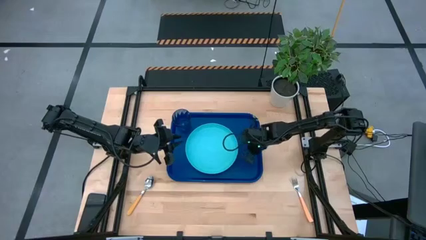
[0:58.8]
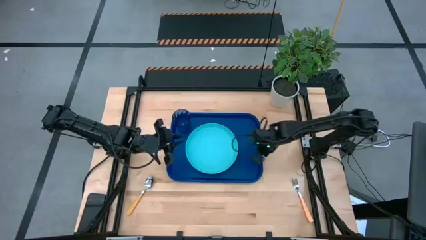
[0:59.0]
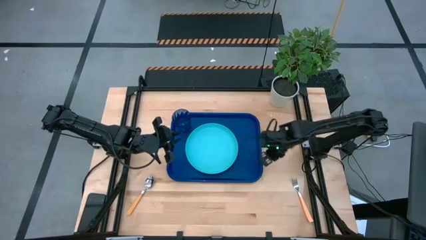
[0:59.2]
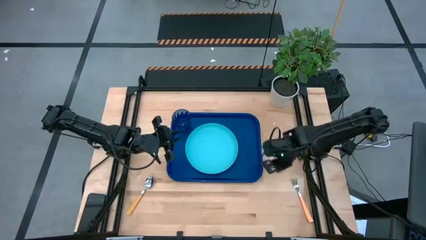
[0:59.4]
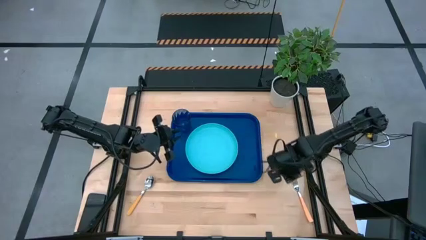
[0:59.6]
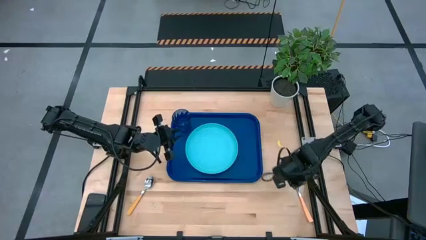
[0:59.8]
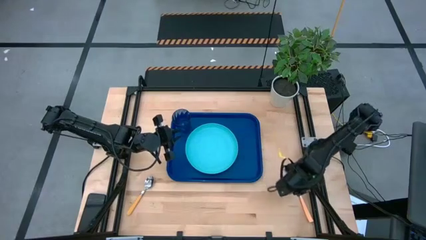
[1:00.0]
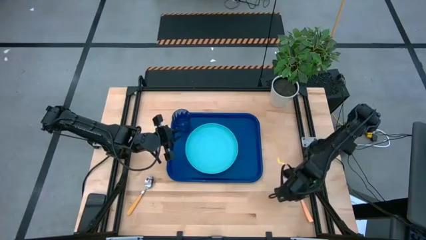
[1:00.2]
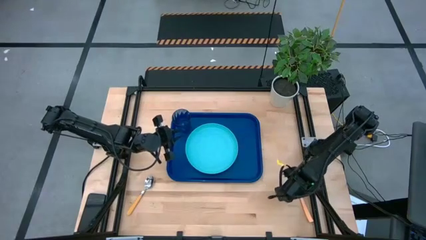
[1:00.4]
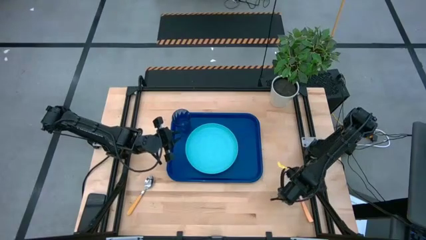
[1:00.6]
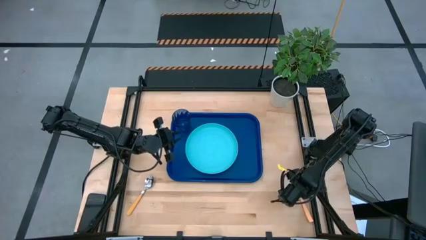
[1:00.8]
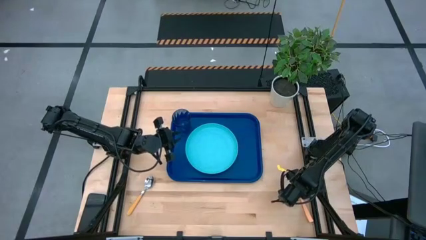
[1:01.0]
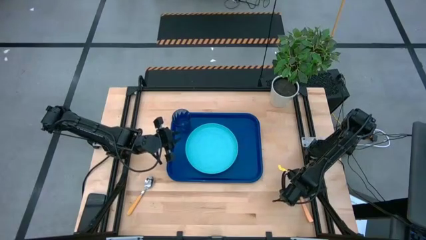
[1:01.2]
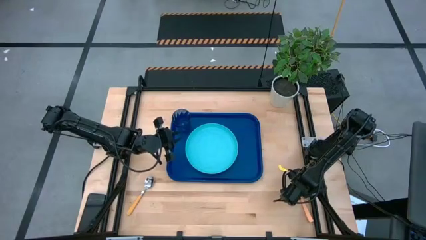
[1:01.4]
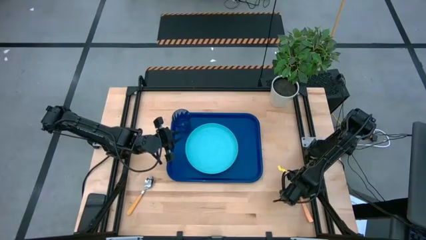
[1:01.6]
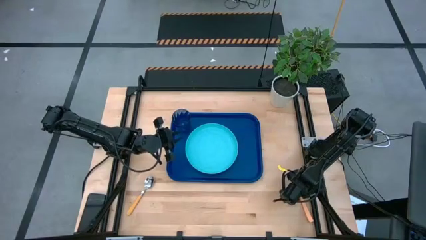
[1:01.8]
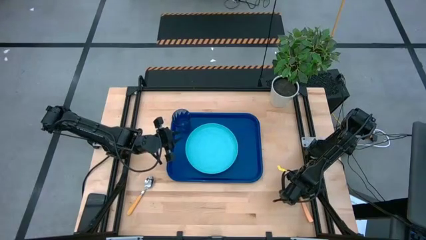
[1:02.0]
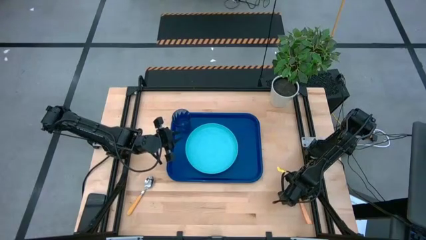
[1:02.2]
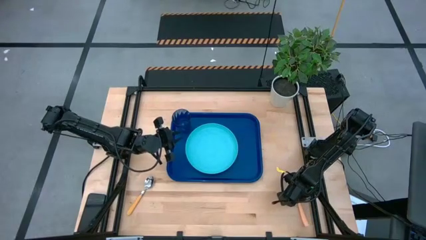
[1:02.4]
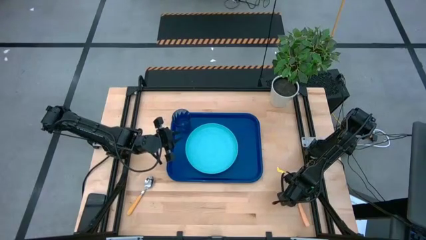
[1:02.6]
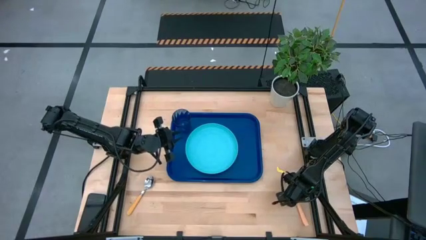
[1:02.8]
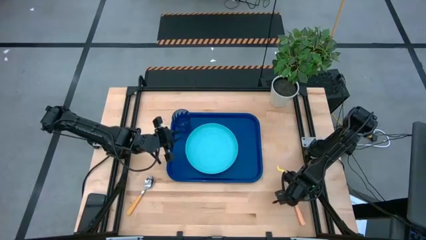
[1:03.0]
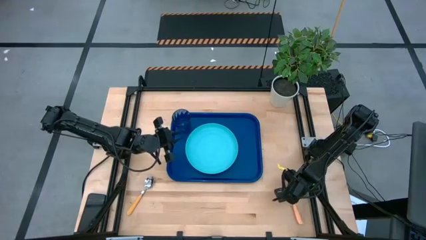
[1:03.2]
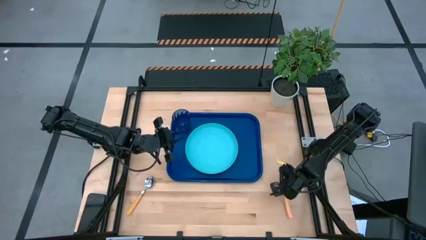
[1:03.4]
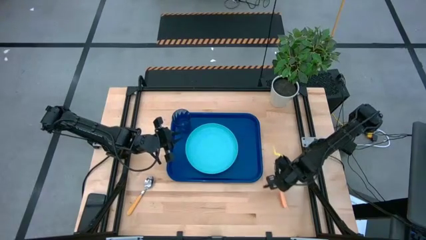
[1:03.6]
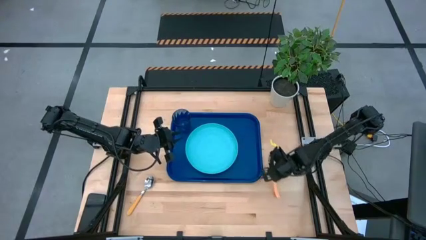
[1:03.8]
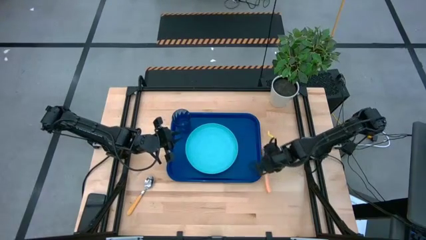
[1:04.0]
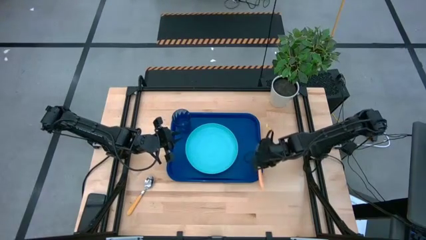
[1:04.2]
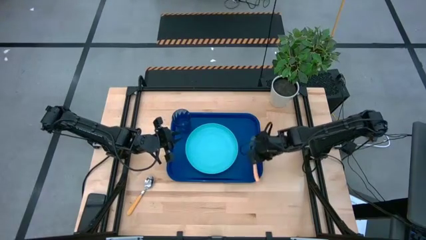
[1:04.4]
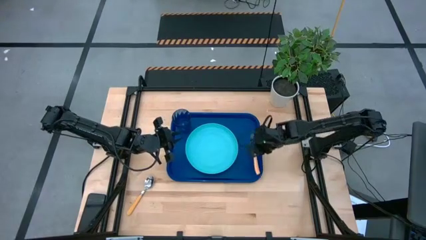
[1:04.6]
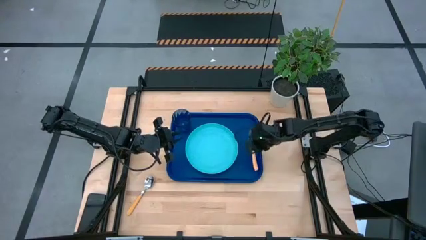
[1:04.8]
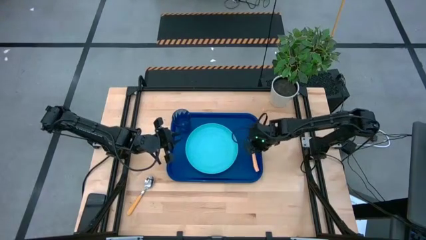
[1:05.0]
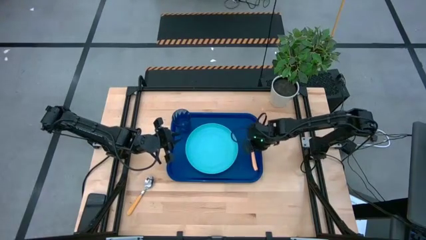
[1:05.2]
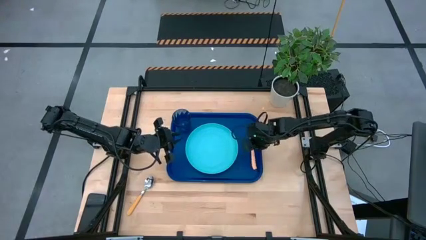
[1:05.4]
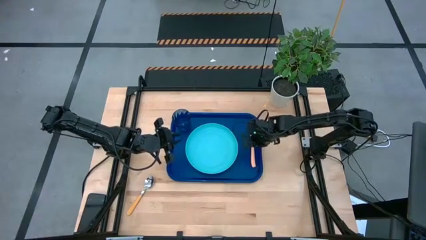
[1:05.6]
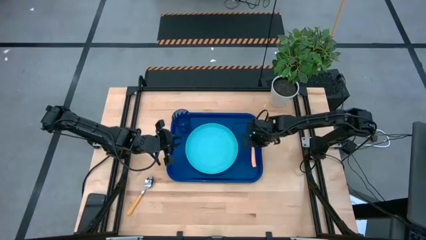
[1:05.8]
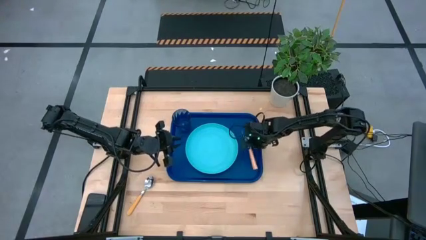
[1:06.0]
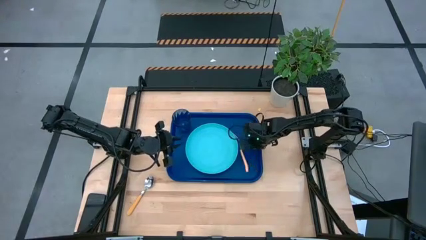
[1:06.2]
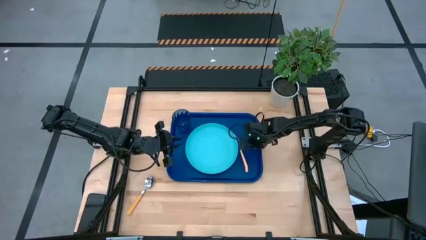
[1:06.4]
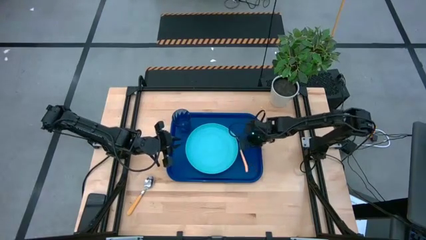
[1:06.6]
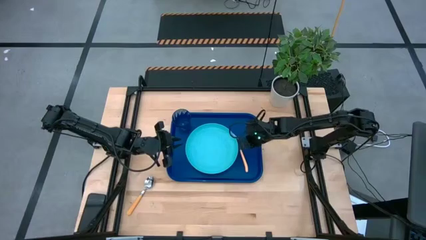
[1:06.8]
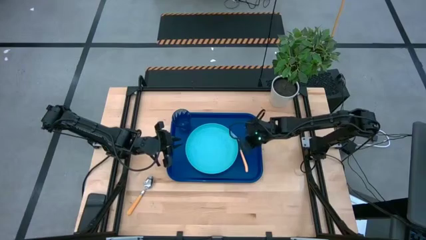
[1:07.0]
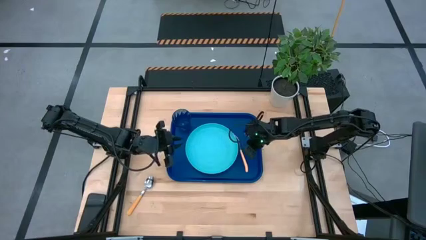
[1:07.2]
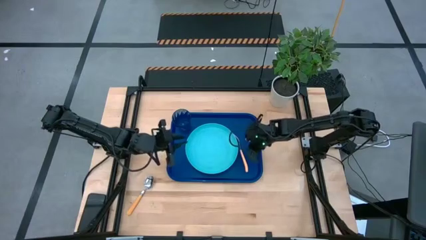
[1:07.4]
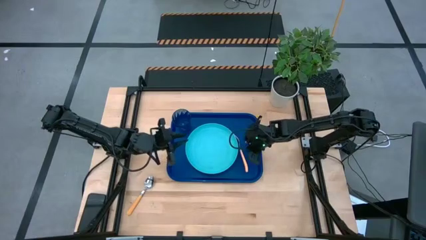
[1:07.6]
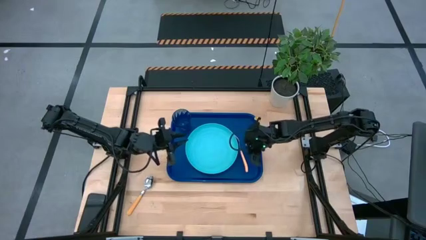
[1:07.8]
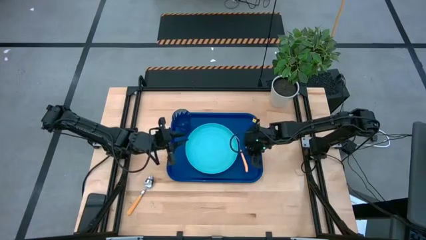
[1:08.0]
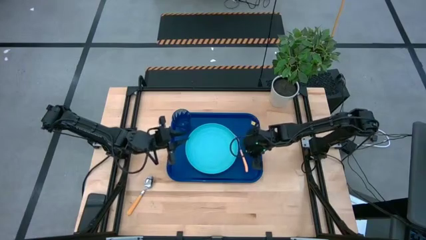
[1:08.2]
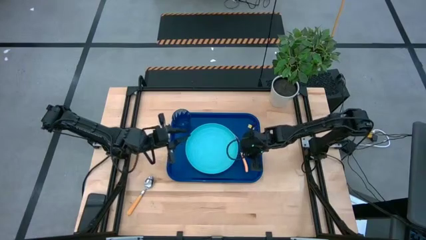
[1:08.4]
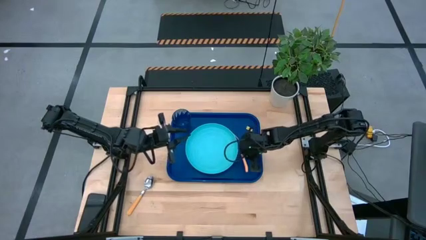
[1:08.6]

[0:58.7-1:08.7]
Task: Pick and place plate/cup/fork/spoon on tray
Put the orange fork beside the light blue plate
